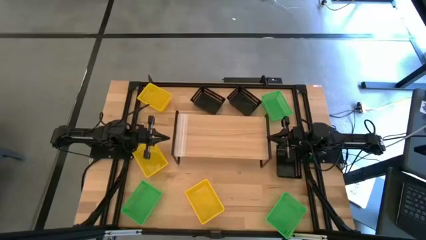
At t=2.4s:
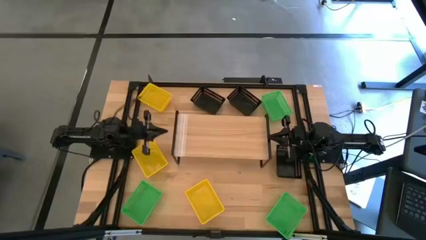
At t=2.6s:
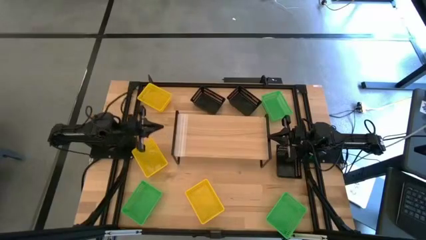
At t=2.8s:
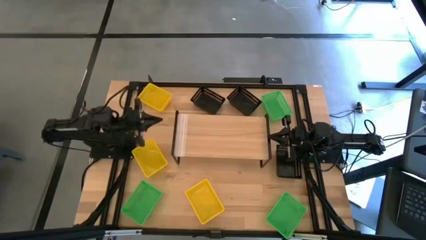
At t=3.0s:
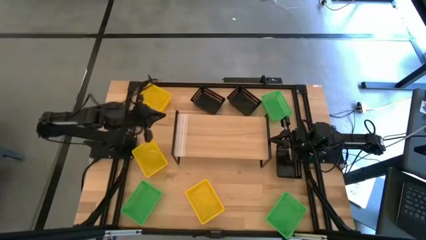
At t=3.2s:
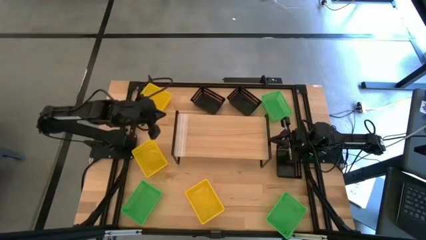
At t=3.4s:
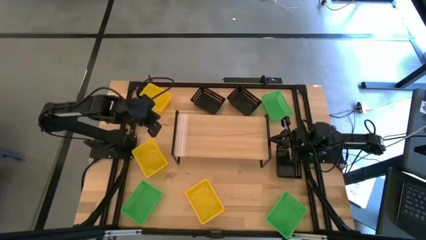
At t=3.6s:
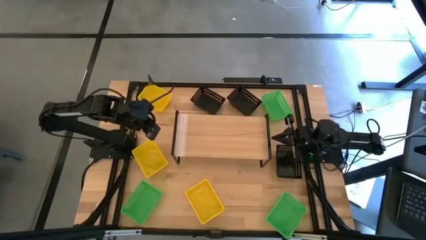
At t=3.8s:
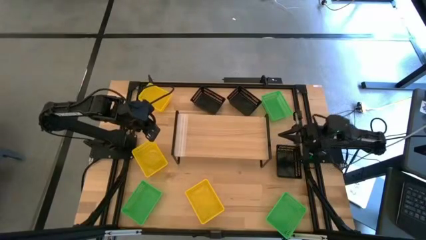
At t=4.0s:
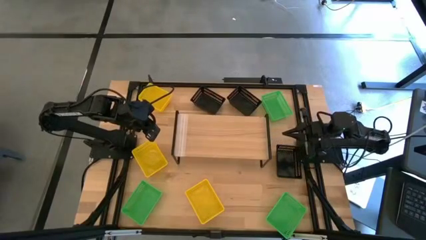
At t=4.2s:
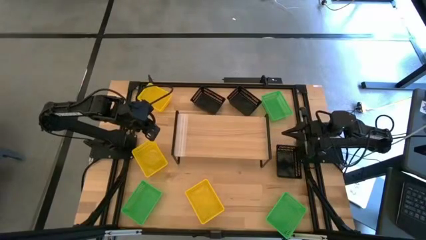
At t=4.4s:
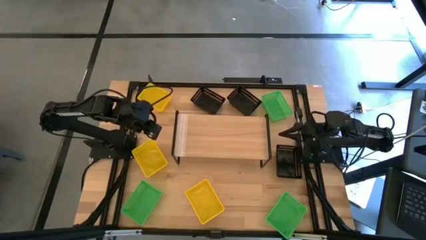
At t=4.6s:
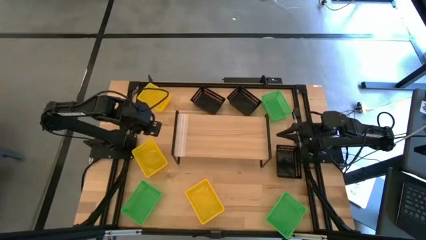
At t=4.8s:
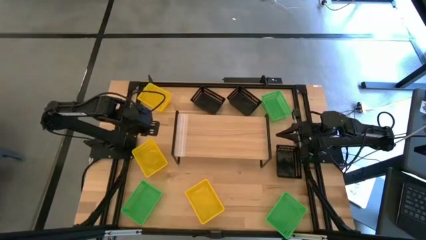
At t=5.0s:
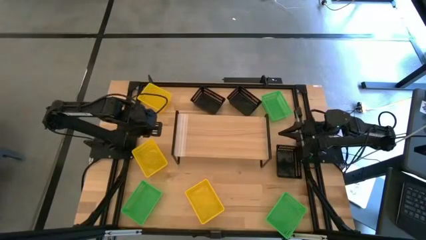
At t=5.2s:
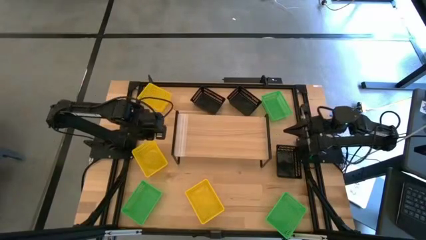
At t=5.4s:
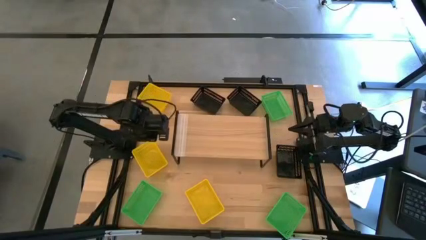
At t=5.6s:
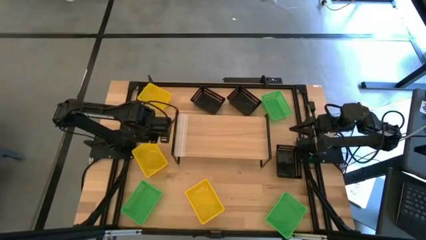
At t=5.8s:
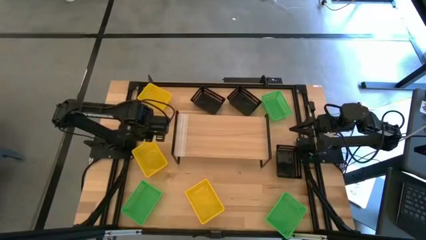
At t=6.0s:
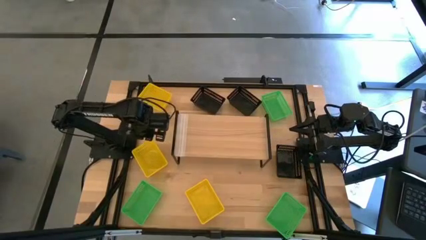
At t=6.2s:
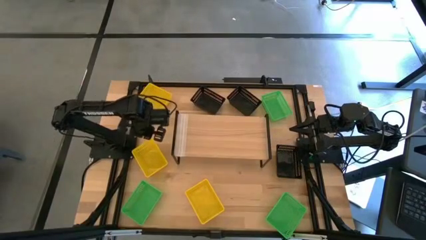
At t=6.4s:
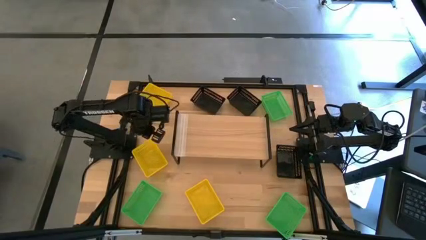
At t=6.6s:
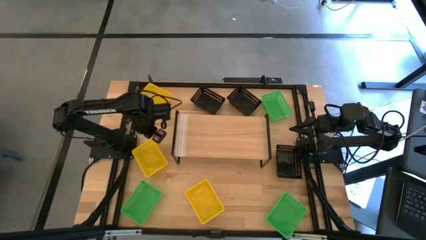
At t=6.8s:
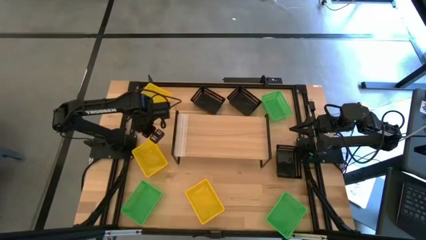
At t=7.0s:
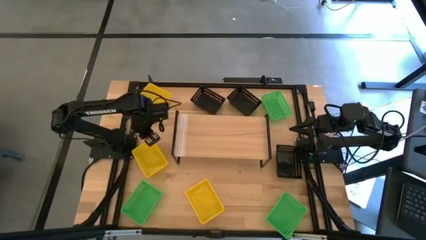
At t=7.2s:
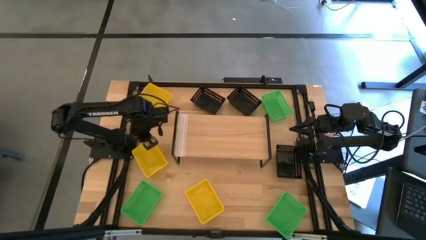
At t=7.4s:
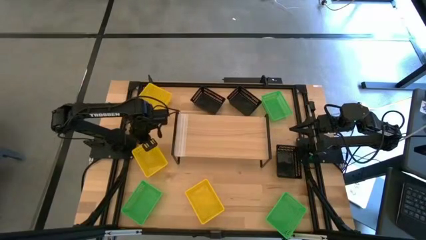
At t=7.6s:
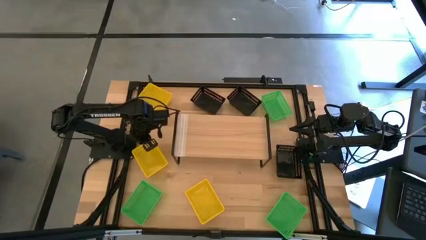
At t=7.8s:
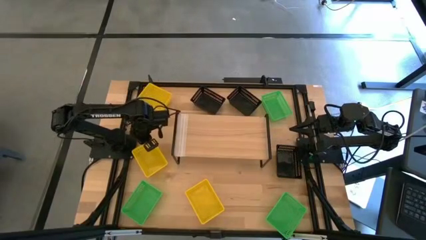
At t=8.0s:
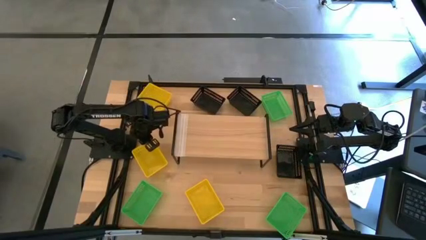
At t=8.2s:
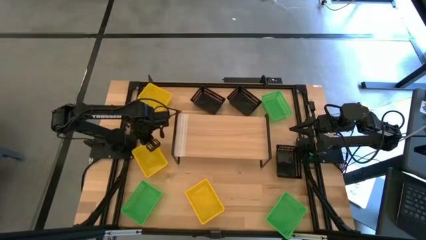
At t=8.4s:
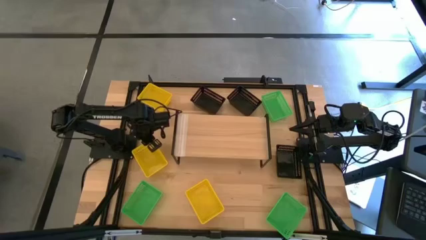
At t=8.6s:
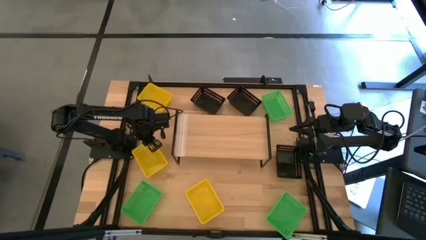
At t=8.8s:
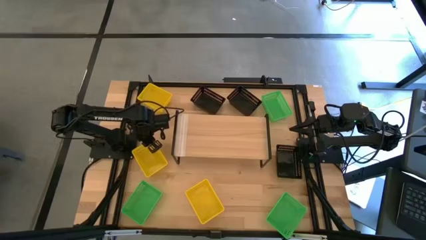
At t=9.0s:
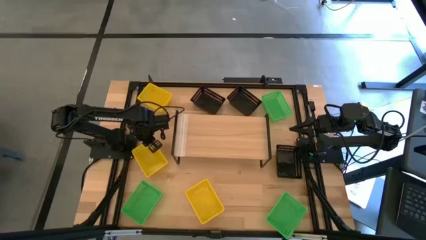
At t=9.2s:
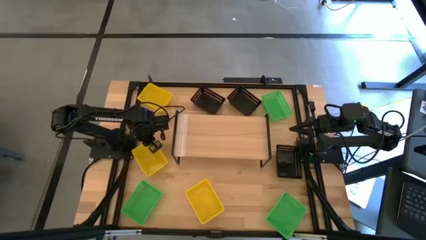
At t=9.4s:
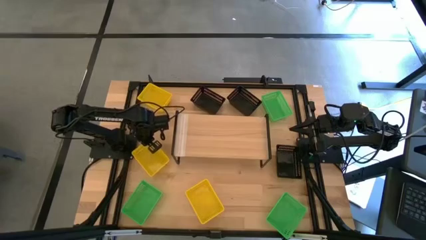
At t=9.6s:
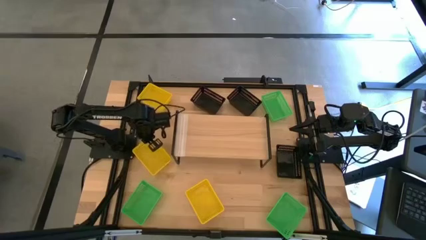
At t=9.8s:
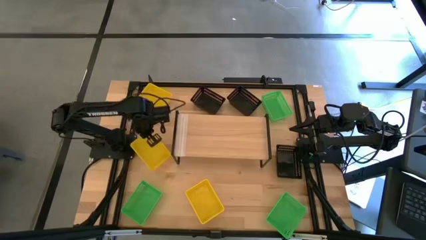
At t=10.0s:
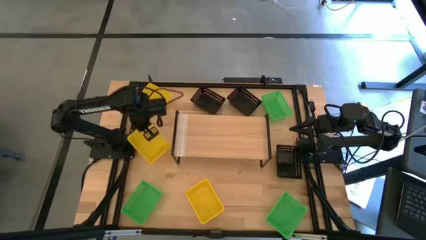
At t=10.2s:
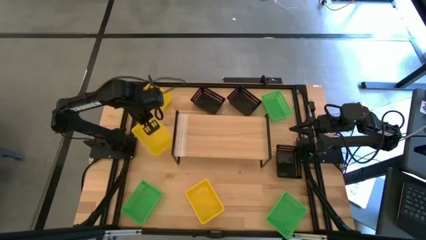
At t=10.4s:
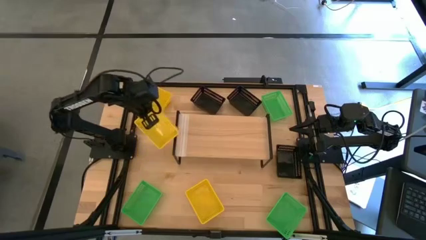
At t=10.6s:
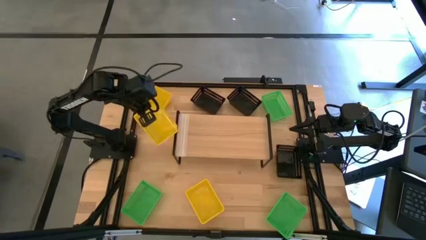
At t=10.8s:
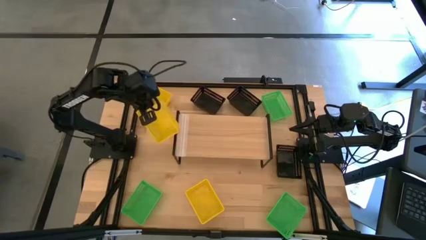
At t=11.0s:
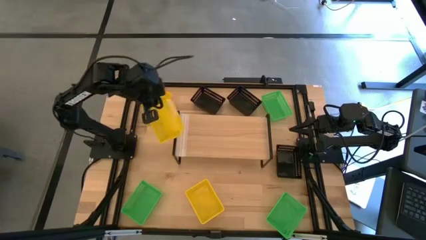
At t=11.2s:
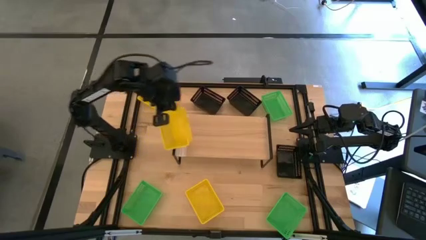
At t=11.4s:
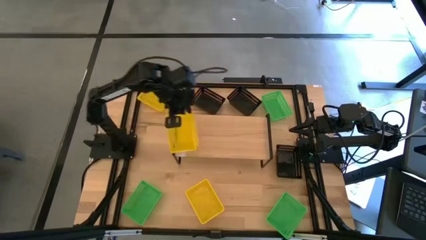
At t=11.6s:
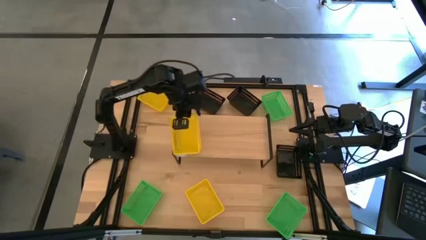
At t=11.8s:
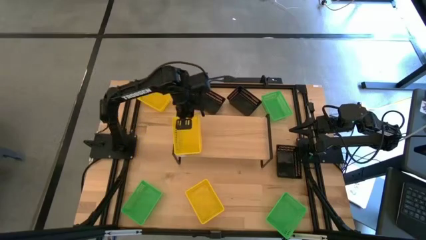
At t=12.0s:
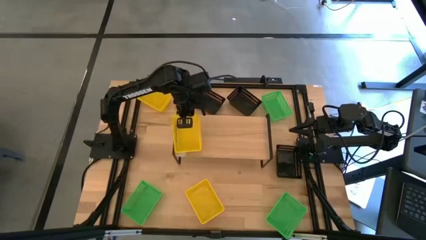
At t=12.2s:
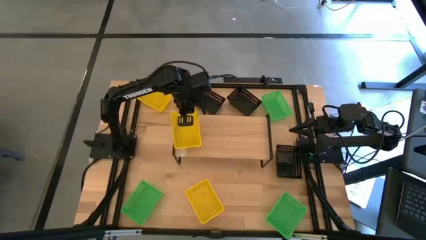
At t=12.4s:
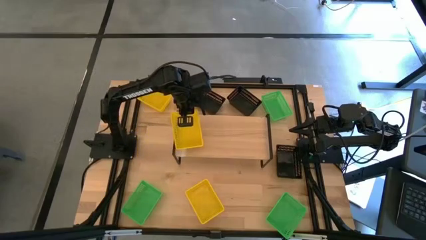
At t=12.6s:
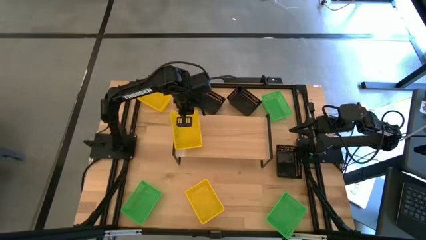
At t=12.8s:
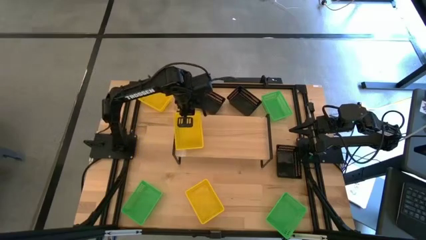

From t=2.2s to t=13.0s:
Task: Stack baskets on shelf by color
Put the middle left yellow bin on the shelf
